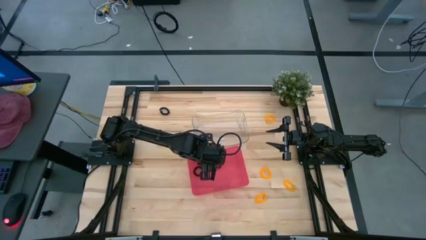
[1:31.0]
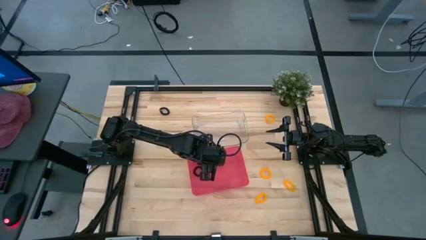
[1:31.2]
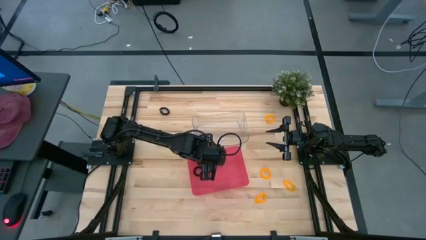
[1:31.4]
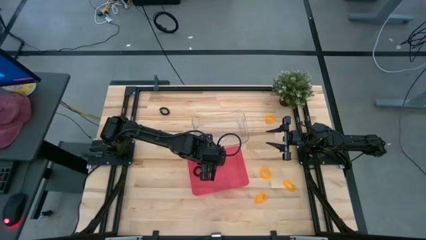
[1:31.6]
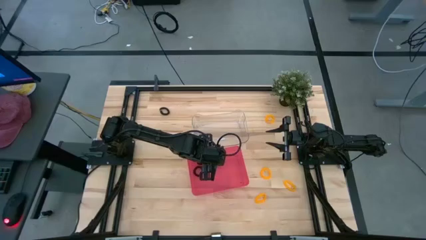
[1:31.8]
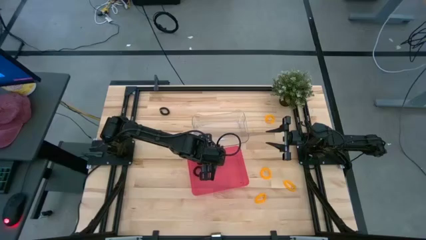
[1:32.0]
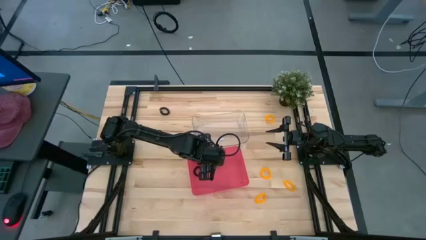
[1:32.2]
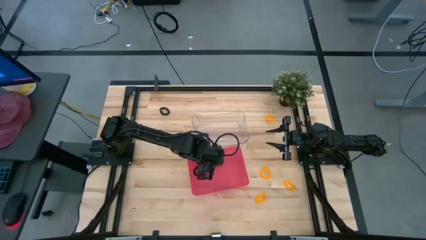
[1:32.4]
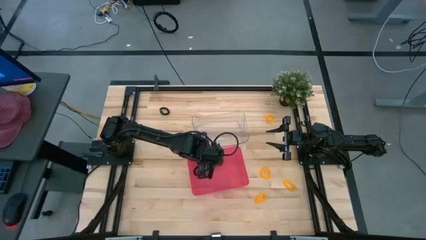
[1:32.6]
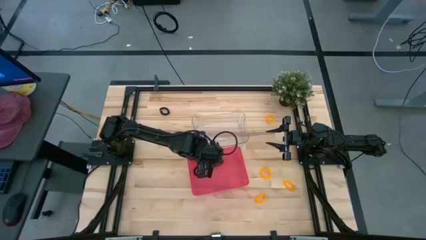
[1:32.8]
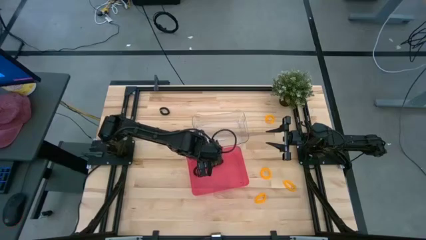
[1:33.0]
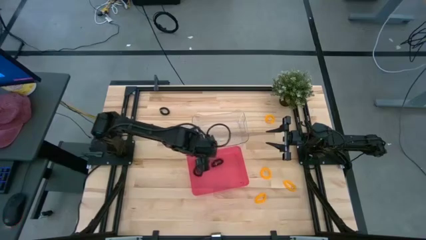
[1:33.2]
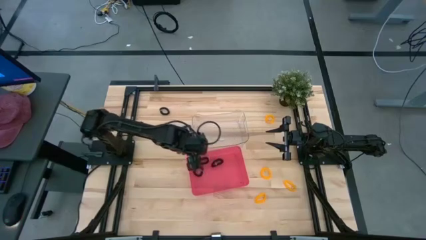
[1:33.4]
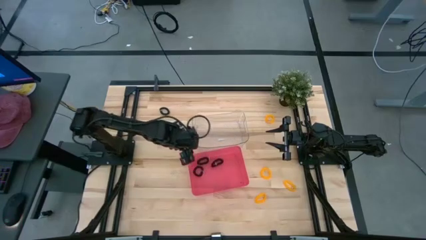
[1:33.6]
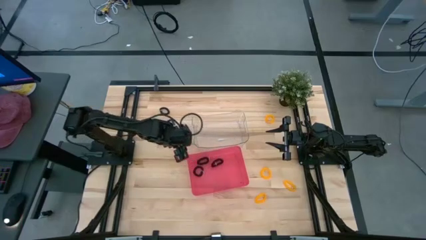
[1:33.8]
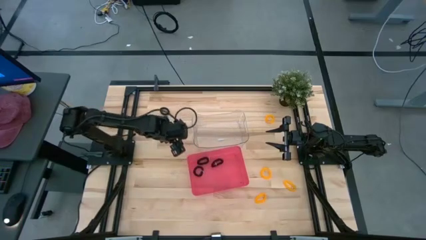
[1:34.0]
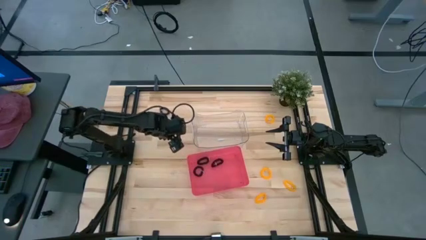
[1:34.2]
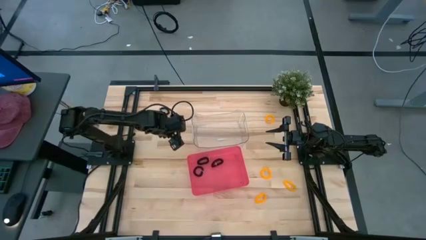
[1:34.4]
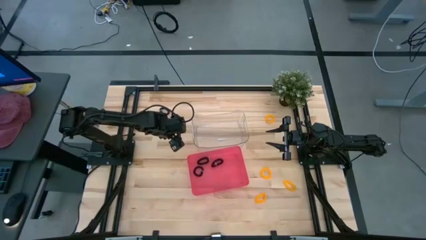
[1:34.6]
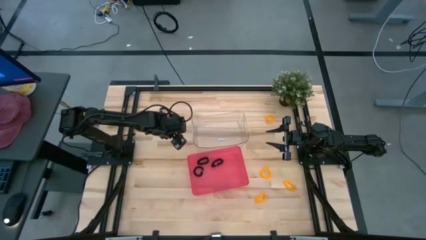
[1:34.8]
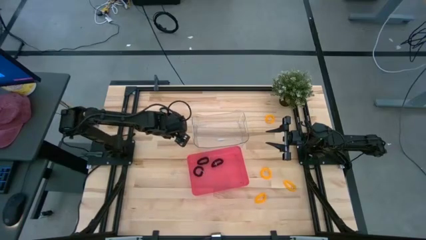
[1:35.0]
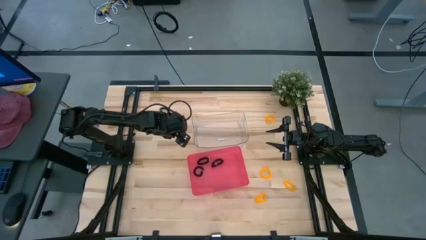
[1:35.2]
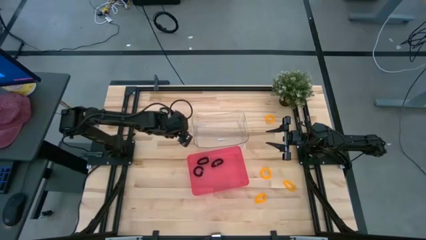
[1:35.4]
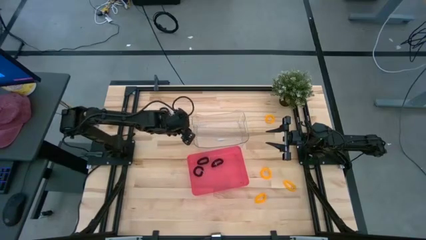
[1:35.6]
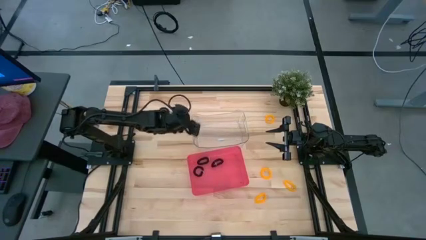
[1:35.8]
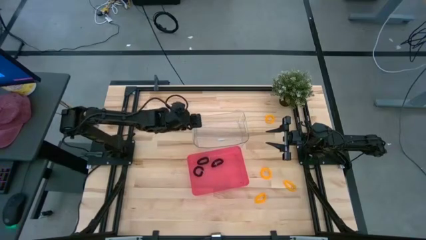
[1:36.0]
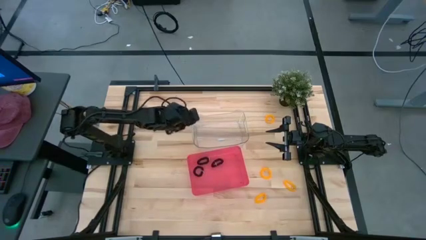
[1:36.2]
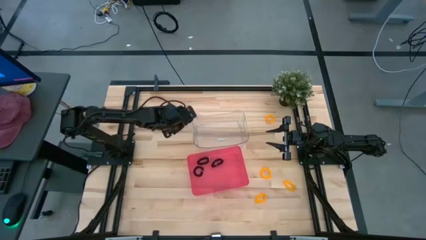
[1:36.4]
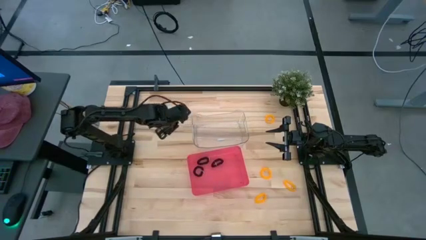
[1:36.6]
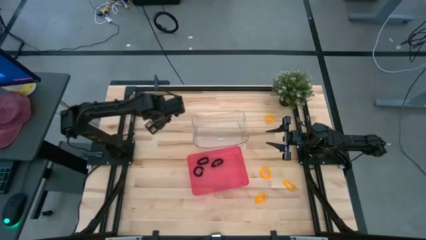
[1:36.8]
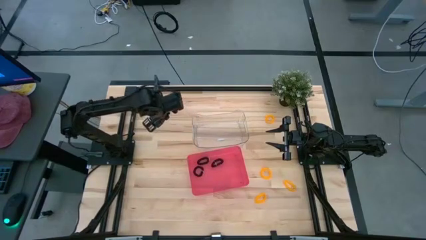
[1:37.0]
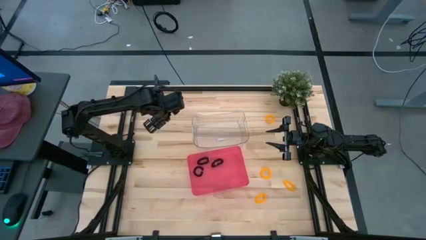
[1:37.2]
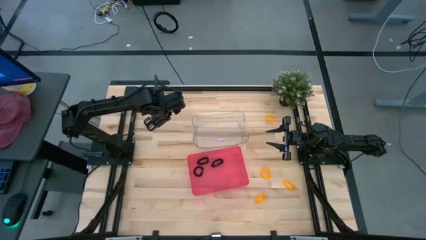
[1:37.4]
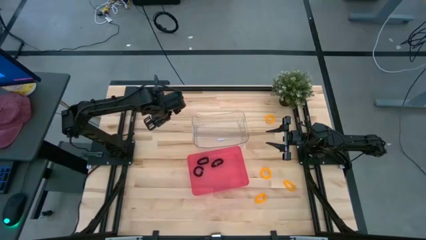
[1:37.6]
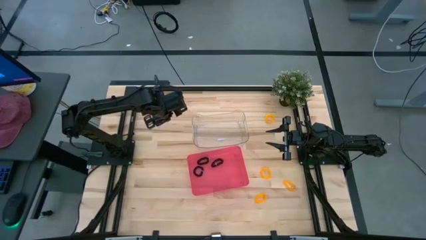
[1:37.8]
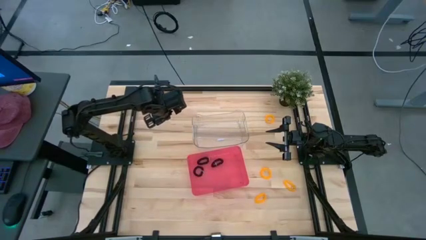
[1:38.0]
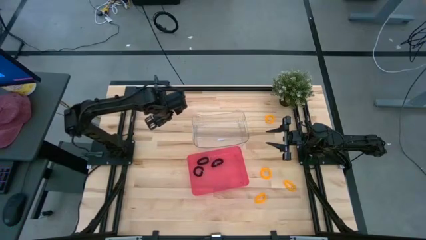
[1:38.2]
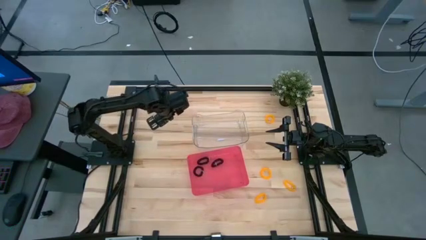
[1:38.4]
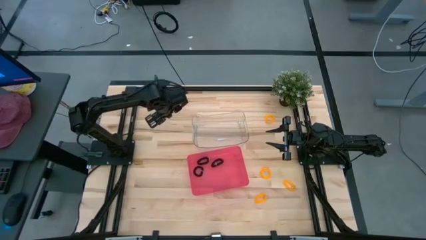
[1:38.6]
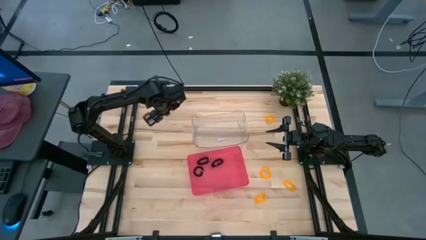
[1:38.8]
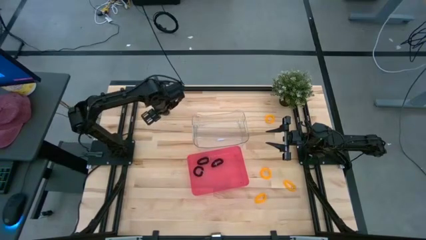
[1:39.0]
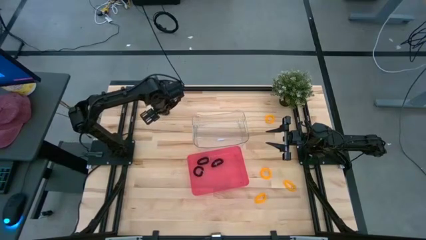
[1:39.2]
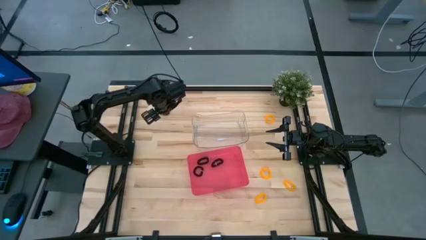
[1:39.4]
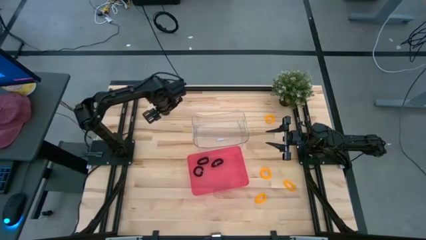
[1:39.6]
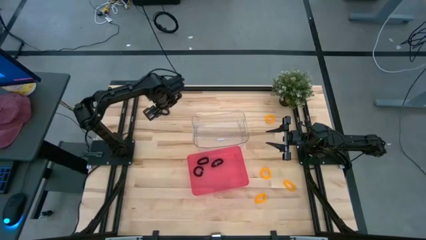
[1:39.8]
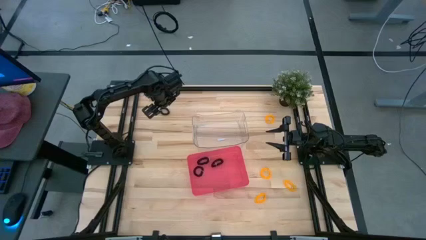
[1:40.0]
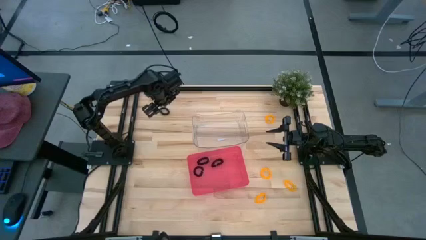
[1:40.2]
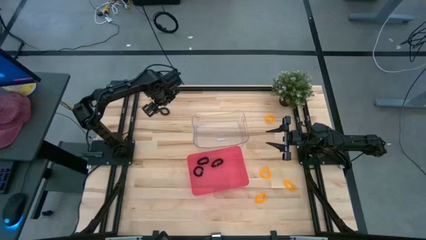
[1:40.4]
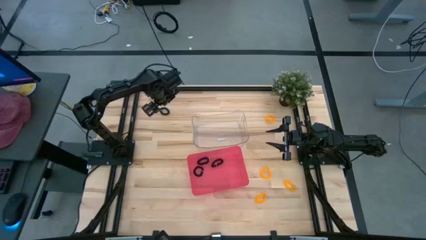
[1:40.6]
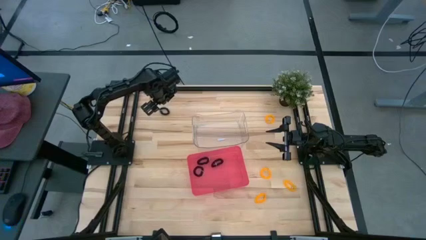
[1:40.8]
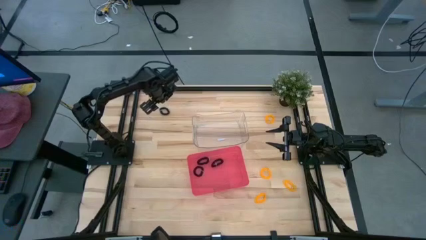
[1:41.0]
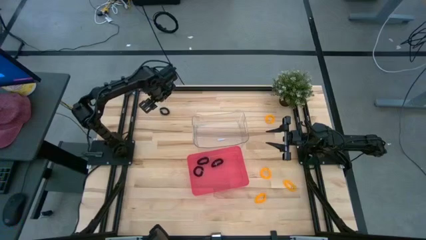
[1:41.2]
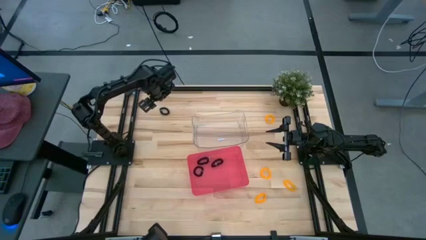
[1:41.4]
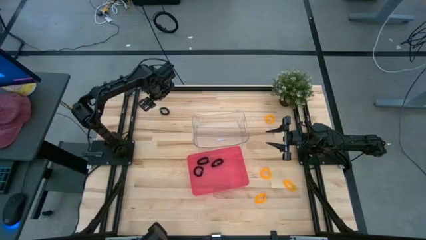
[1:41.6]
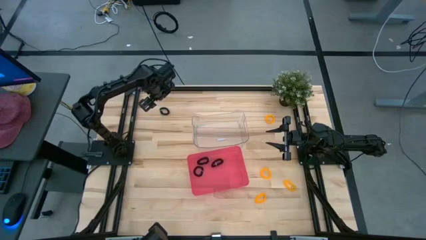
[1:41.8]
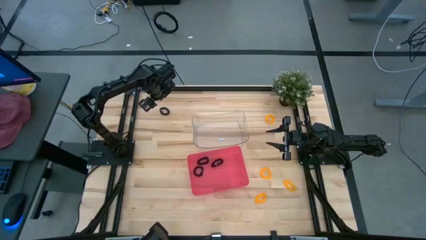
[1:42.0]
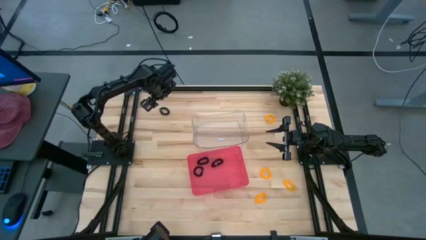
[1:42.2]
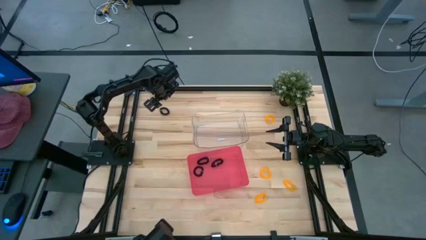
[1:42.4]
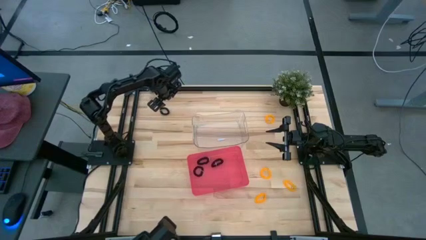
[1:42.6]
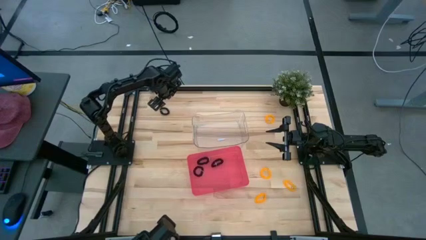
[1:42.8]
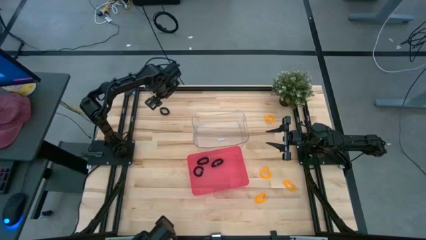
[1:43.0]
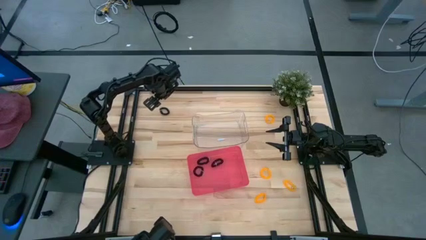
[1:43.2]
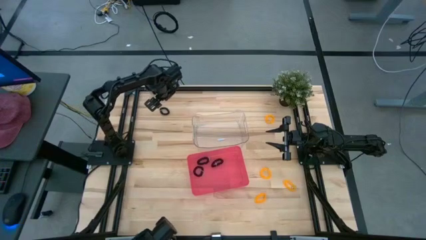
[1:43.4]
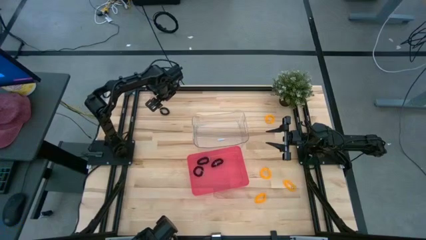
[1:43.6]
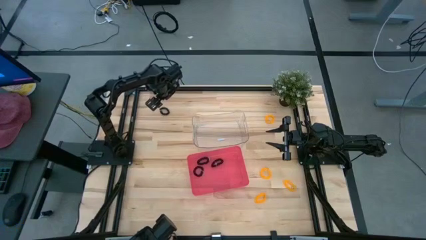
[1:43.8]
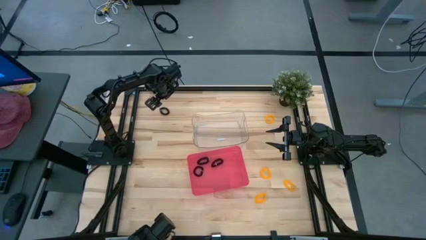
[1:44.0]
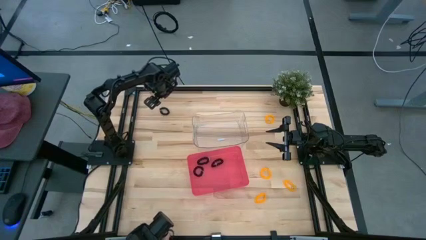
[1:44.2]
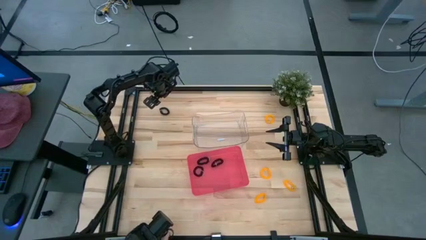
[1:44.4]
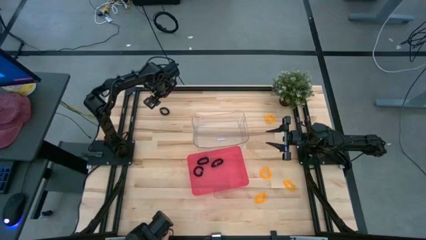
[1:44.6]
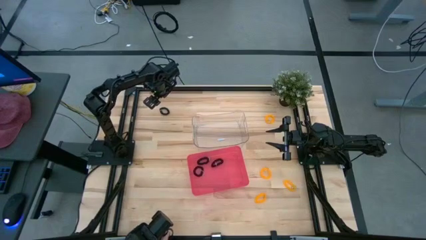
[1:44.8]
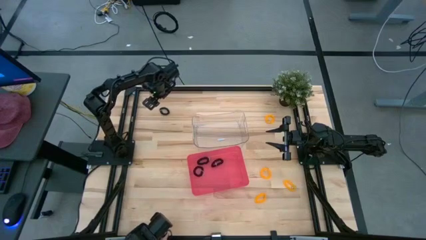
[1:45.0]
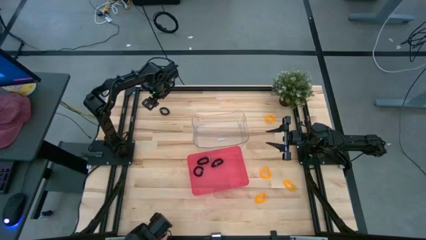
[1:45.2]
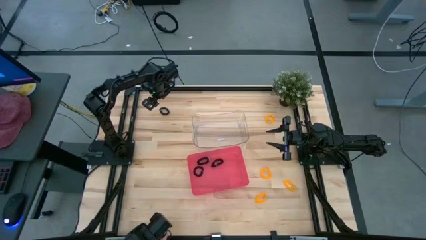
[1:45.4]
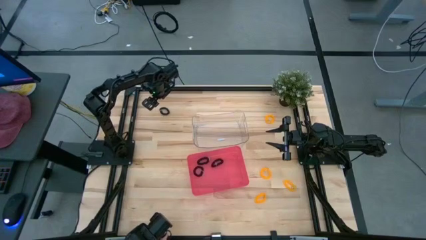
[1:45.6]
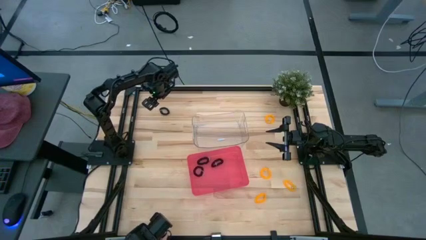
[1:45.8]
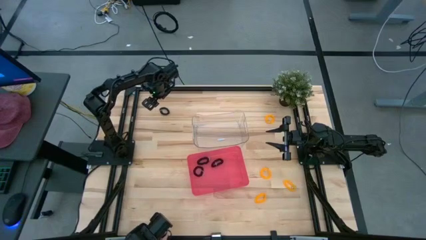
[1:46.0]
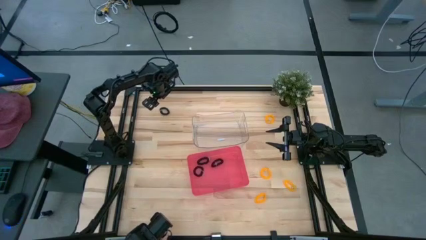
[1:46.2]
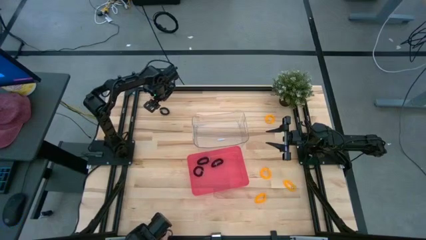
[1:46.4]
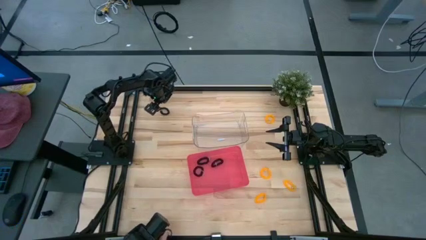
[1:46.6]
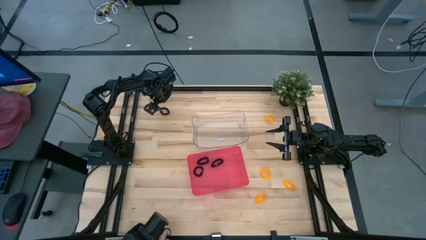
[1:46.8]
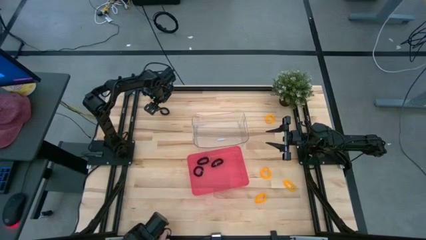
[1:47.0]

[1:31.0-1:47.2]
Task: Sort spring keychains
Put the black spring keychain into the red bin
